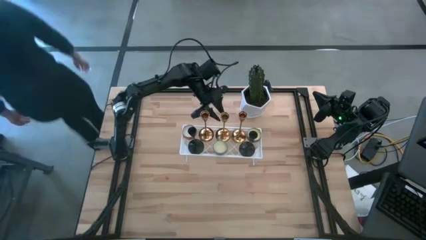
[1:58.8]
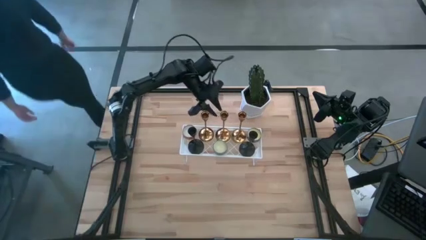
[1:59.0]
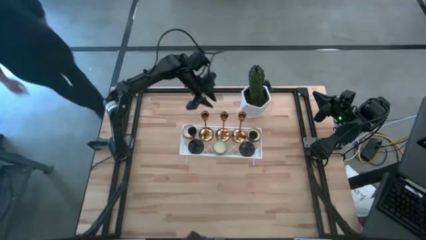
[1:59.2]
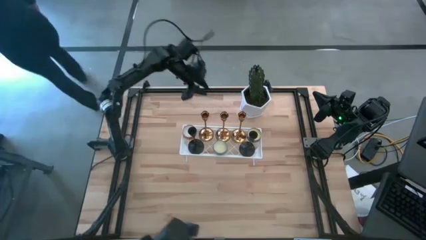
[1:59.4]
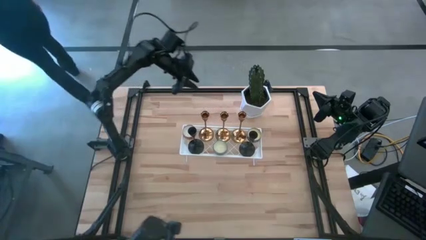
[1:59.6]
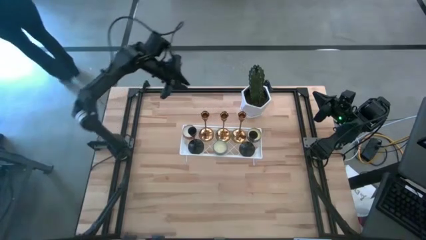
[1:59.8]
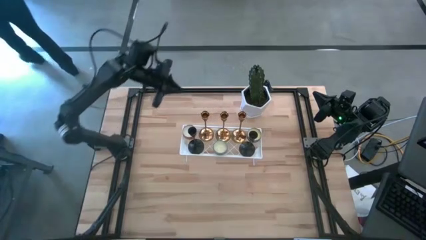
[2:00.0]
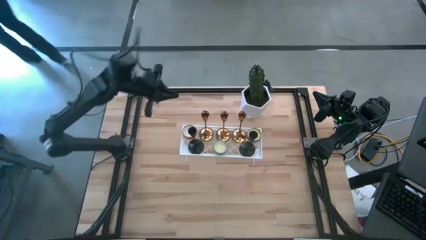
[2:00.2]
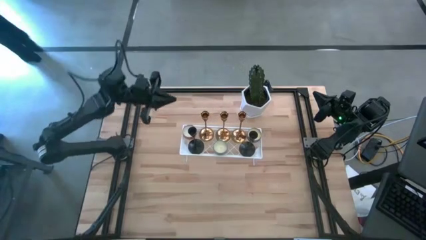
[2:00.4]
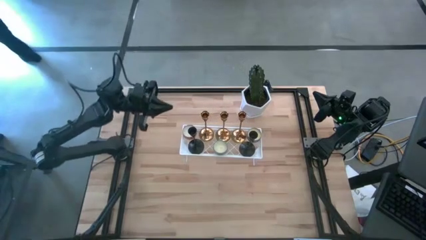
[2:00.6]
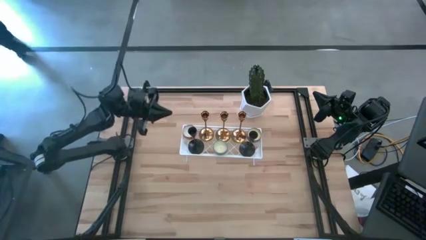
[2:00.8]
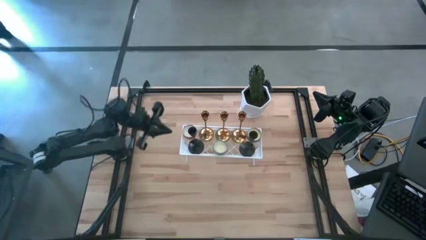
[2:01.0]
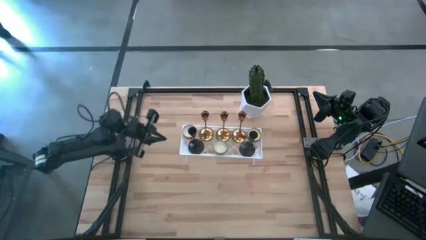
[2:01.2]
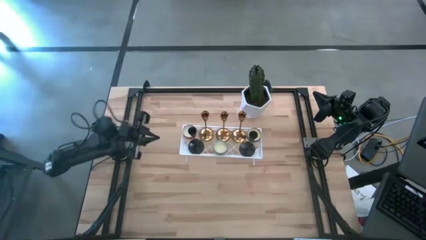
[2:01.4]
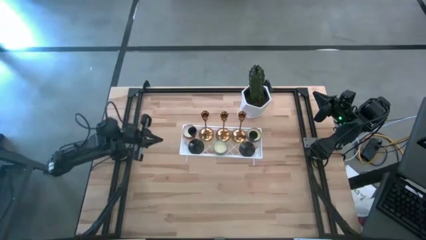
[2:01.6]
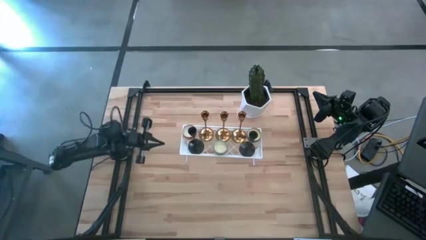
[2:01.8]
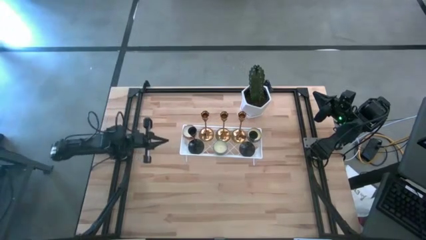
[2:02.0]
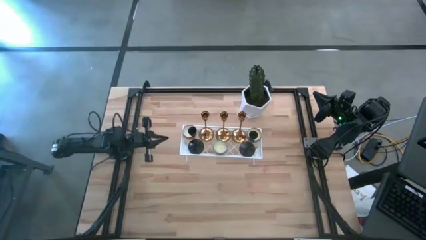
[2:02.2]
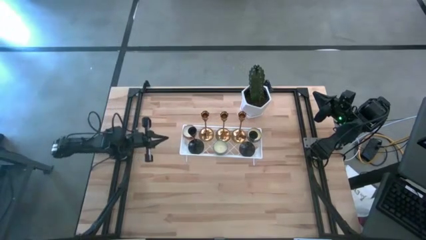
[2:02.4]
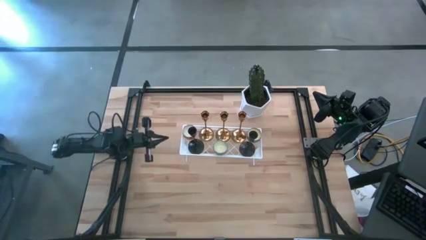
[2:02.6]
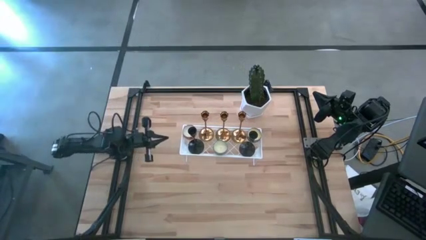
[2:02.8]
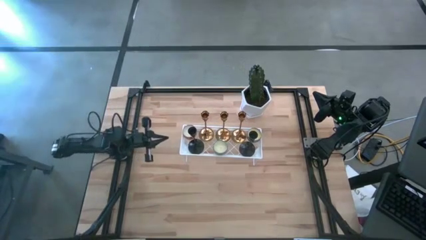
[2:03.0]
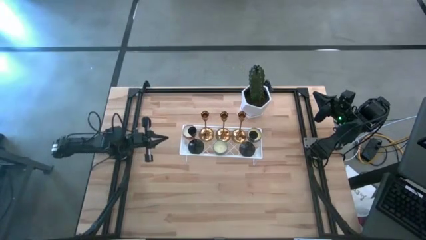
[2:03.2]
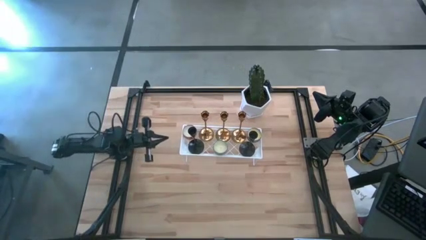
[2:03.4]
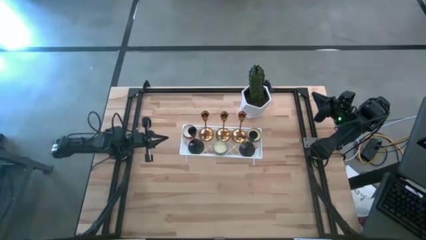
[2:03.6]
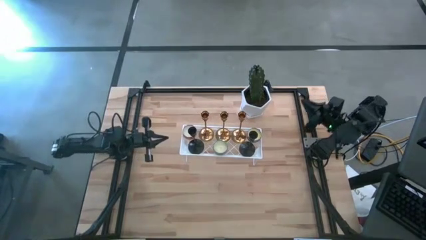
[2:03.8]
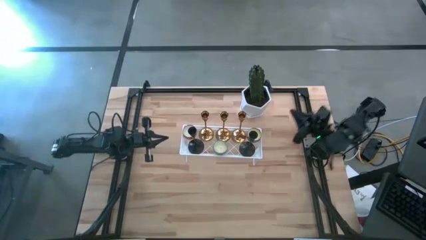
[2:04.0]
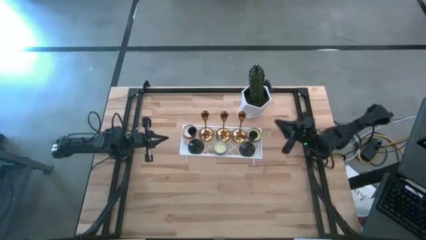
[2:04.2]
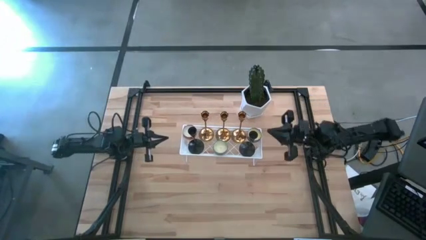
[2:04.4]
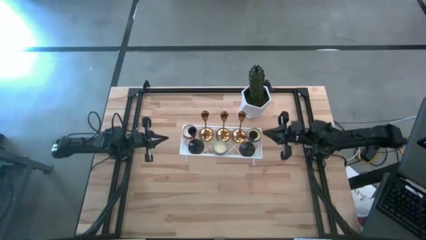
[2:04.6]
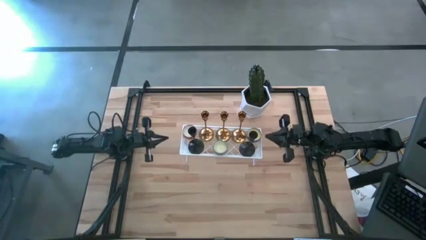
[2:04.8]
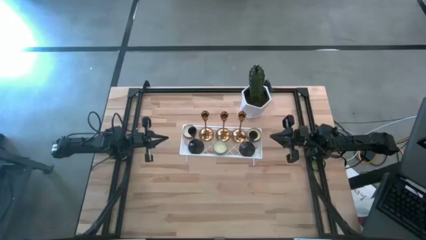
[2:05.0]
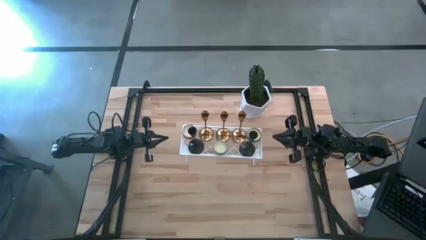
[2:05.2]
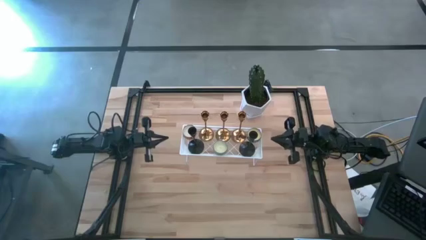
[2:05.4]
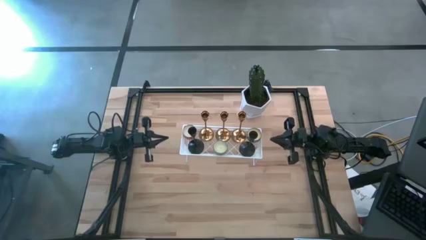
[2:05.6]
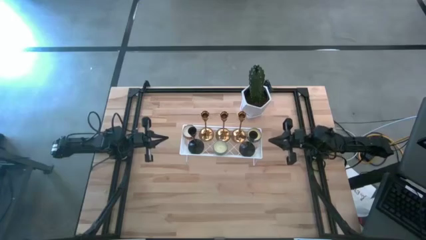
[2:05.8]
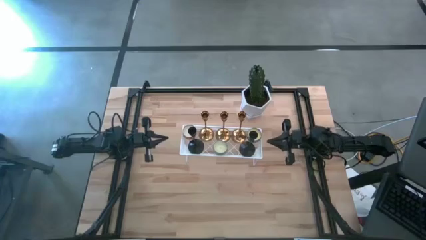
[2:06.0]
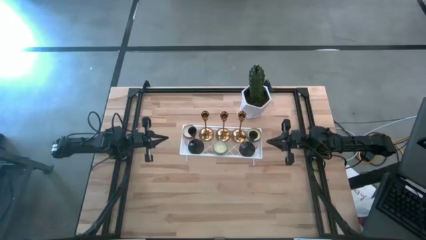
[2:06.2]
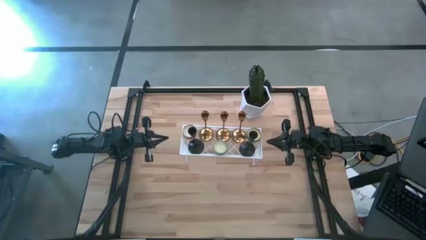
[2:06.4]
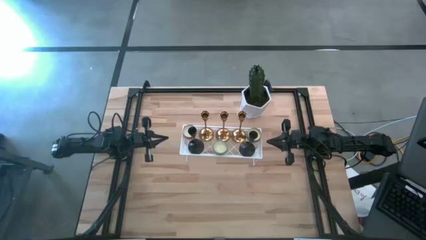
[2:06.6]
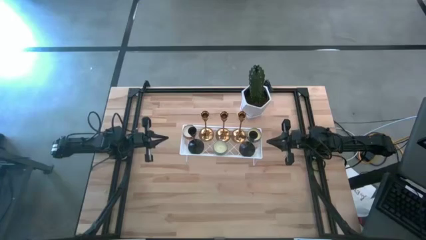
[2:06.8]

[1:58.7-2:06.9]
Task: Pick & Place candle stick holders
Return to Home Position
